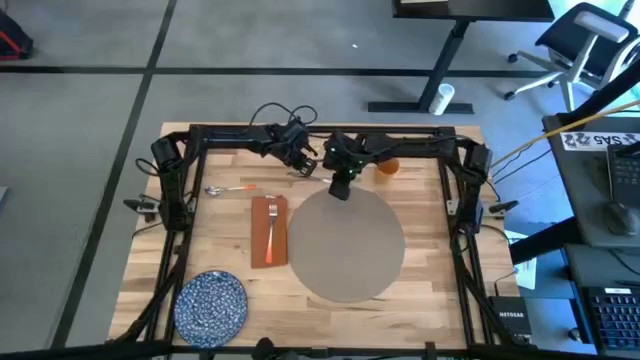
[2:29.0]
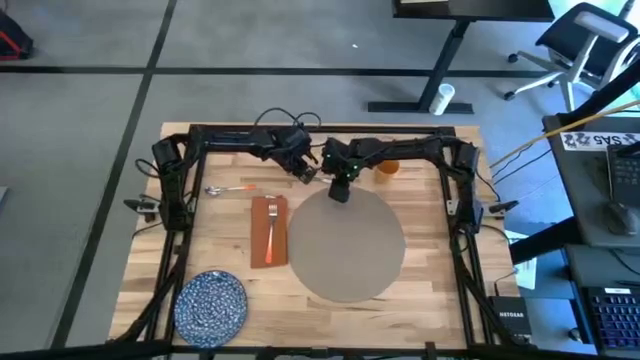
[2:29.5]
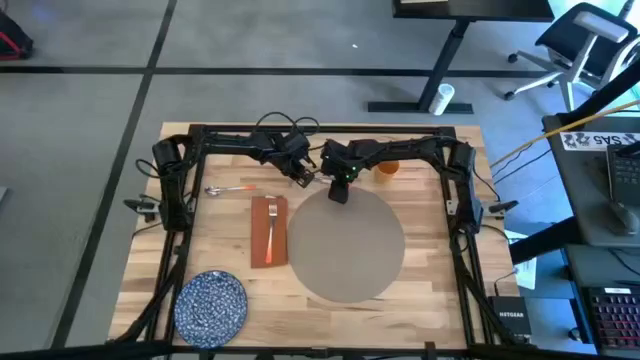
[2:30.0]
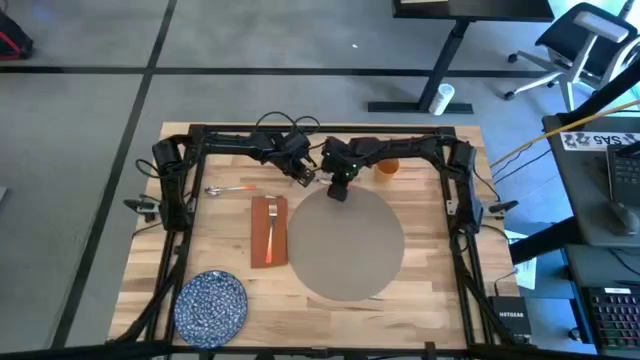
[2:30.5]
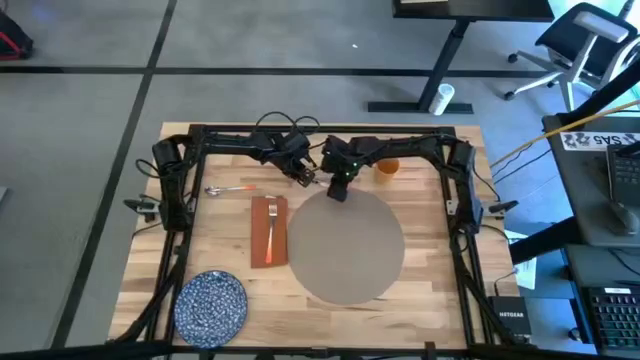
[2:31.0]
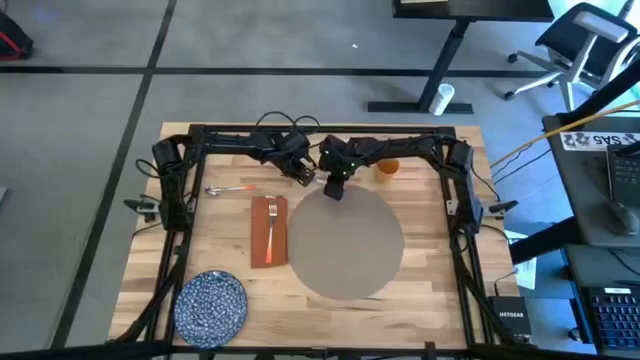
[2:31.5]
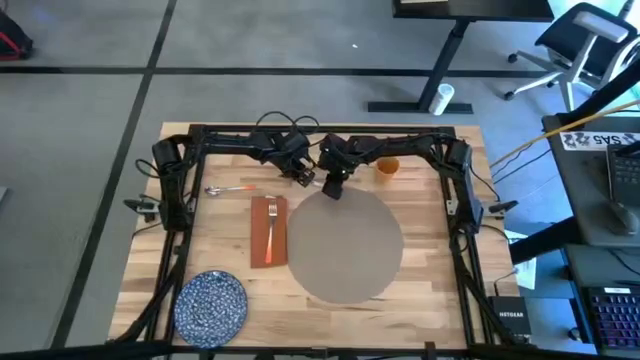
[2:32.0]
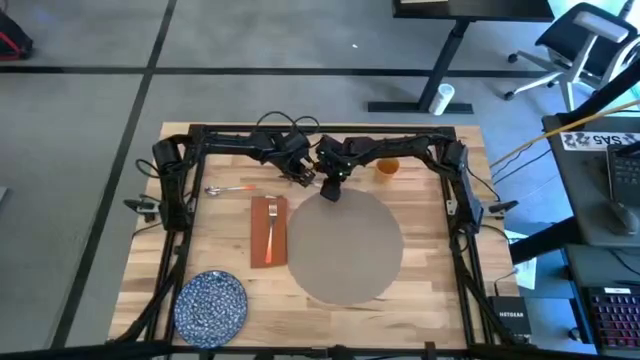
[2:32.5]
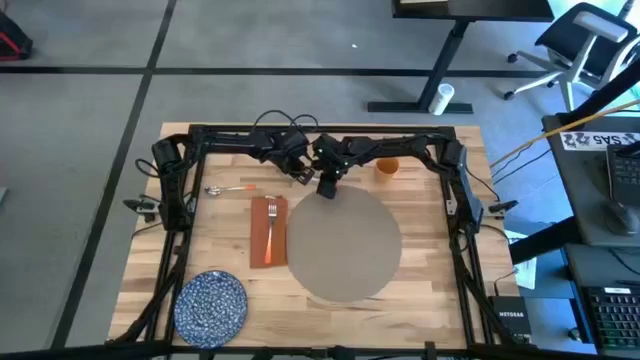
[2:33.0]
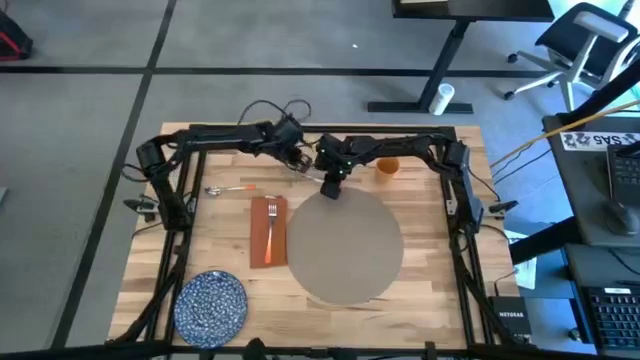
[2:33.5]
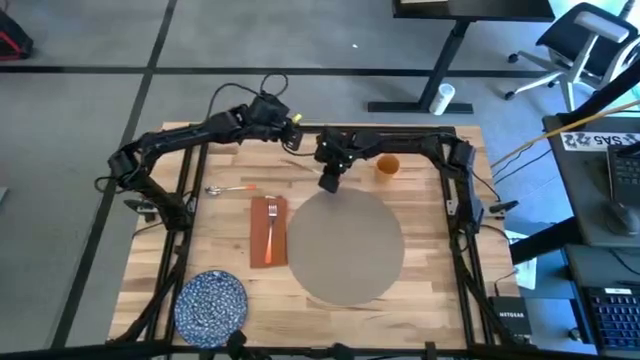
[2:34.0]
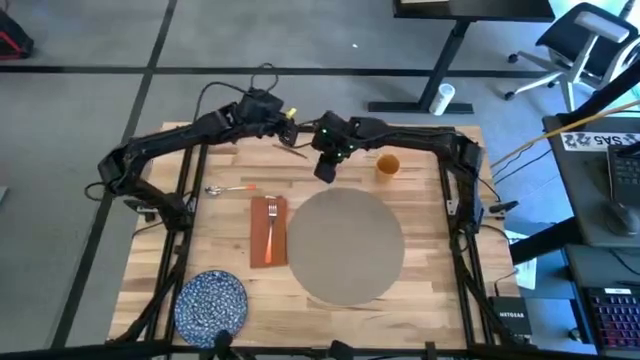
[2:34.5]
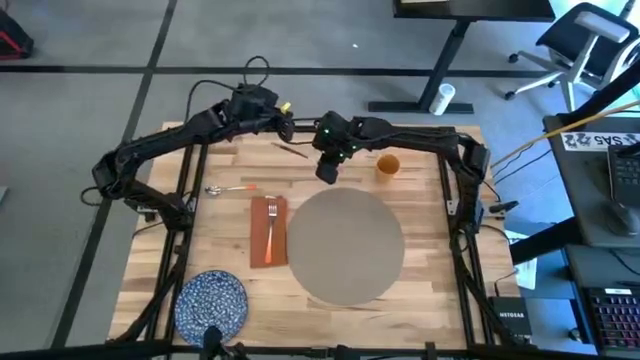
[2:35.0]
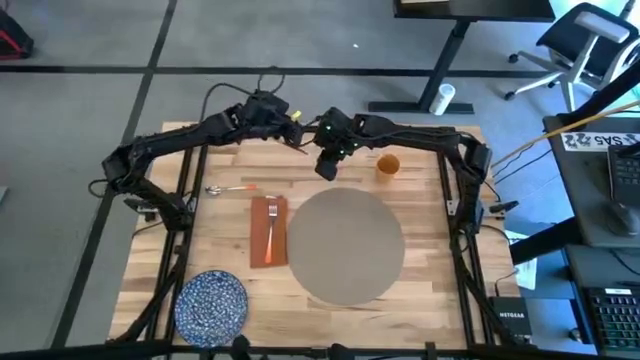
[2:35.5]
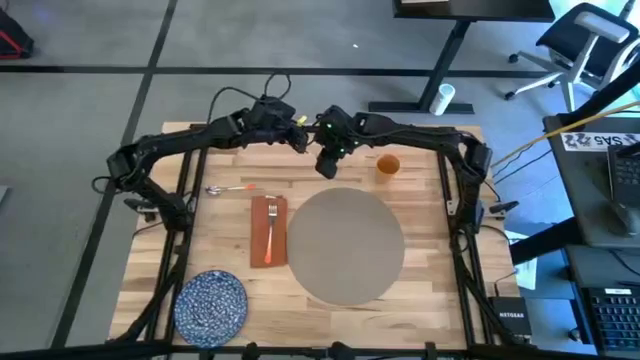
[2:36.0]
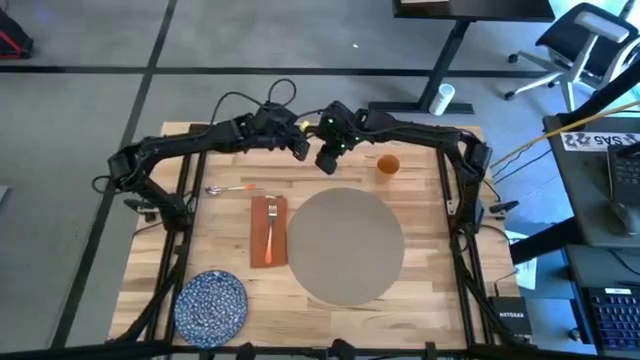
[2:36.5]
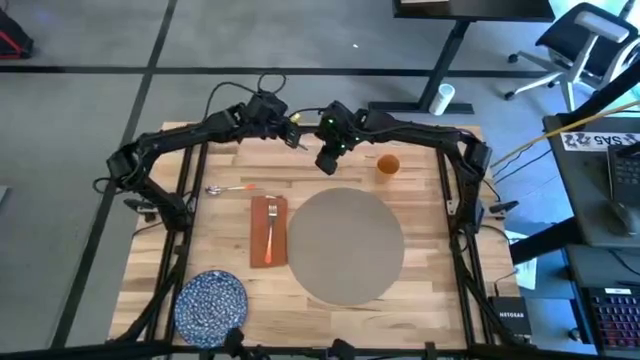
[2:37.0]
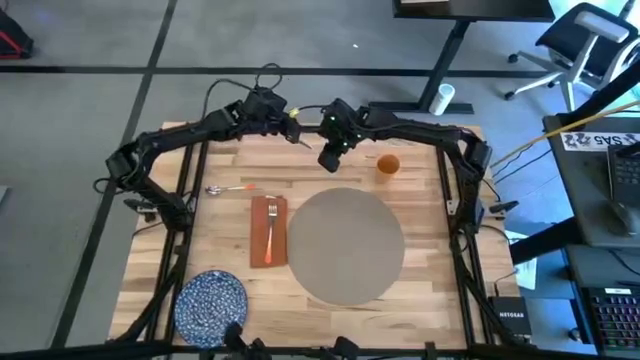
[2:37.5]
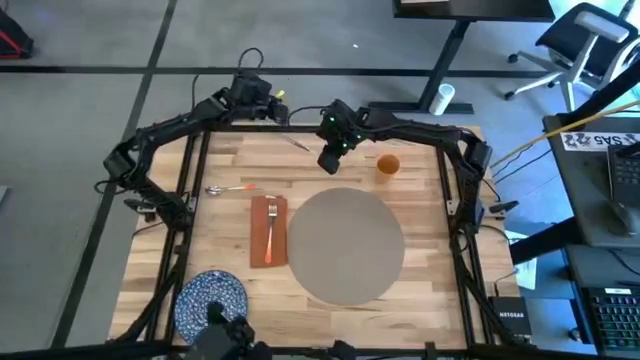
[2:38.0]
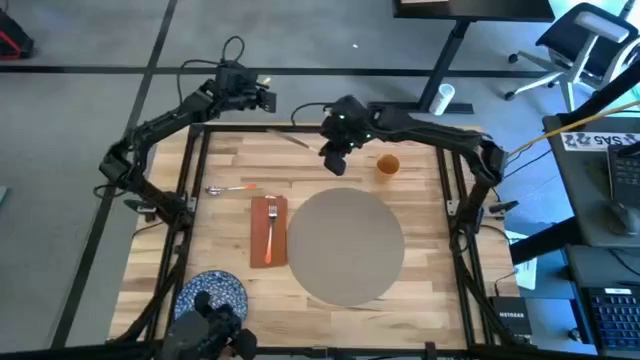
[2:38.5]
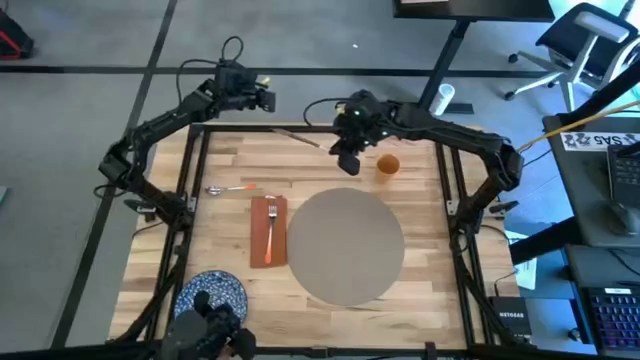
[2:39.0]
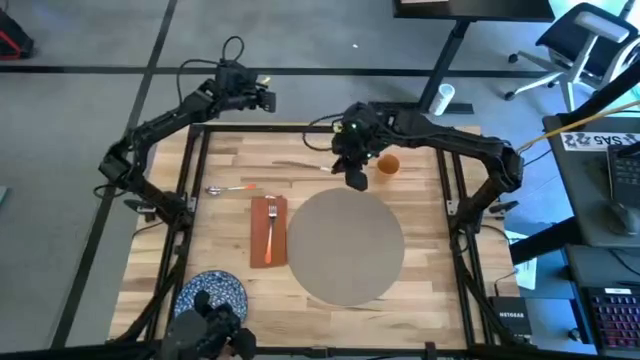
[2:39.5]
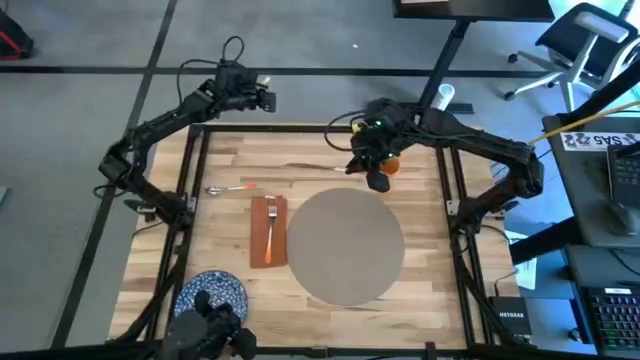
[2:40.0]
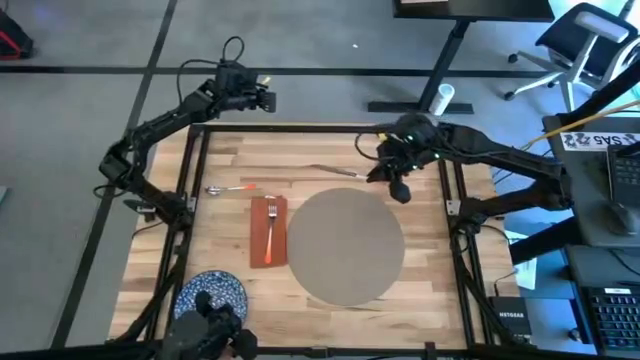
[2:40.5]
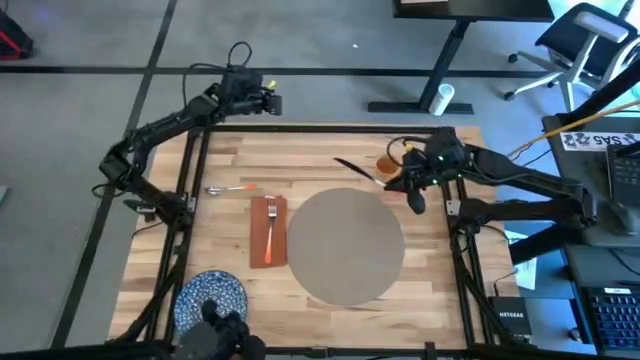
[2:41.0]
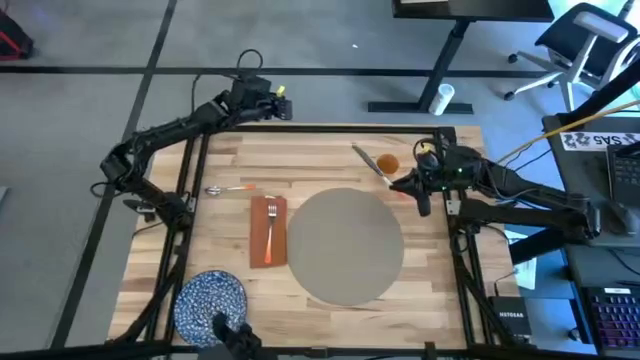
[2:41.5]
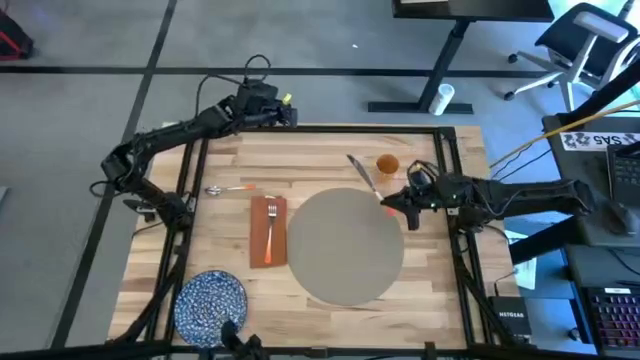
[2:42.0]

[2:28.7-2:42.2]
Task: Set table place
Put the orange knife on the gray mat

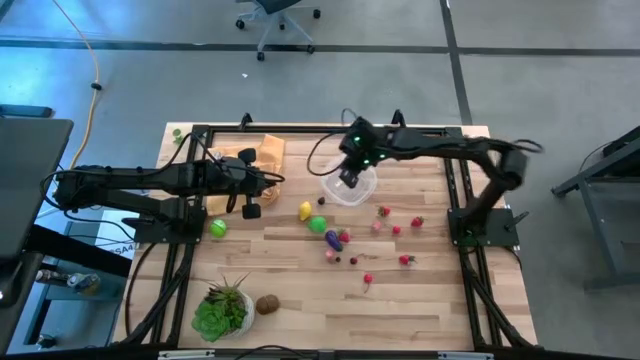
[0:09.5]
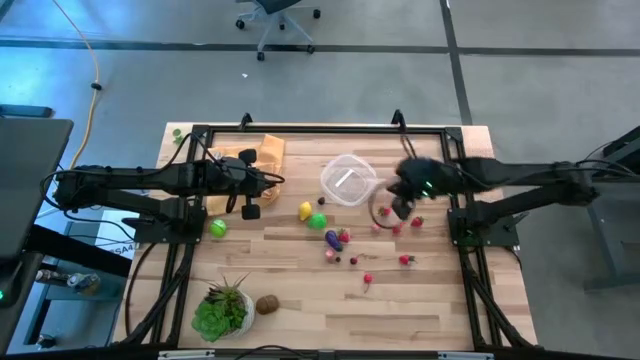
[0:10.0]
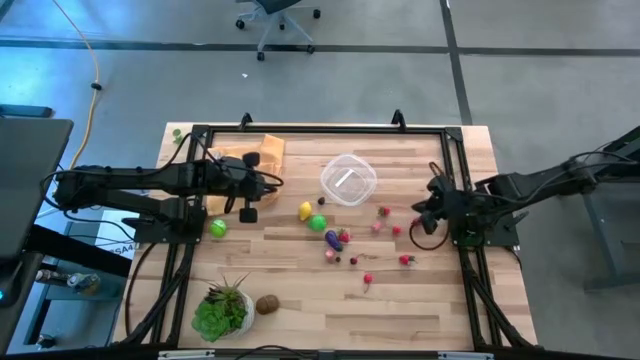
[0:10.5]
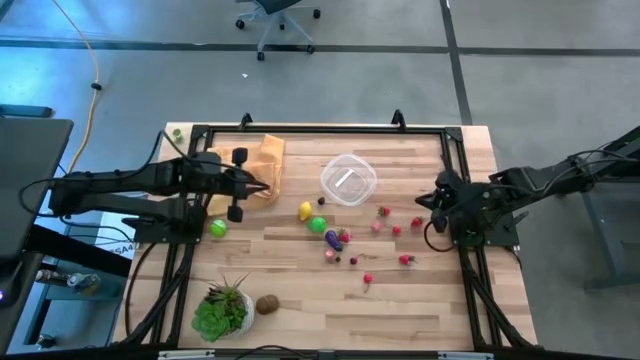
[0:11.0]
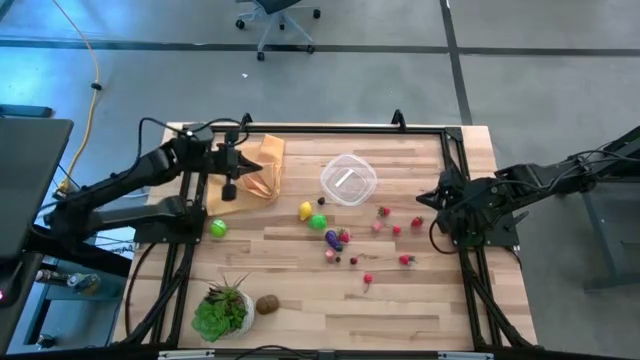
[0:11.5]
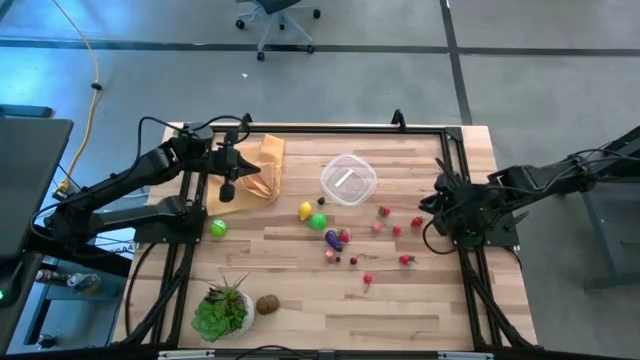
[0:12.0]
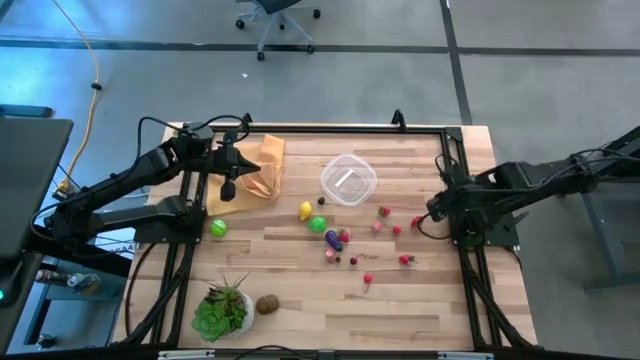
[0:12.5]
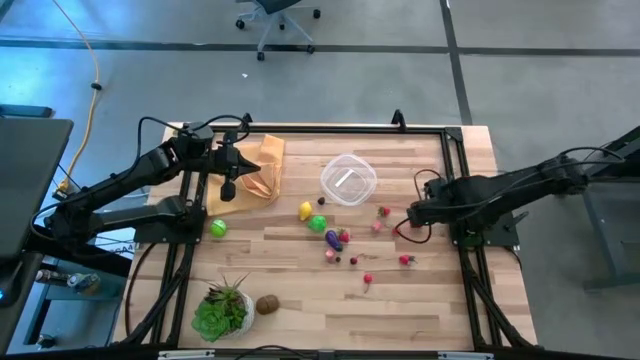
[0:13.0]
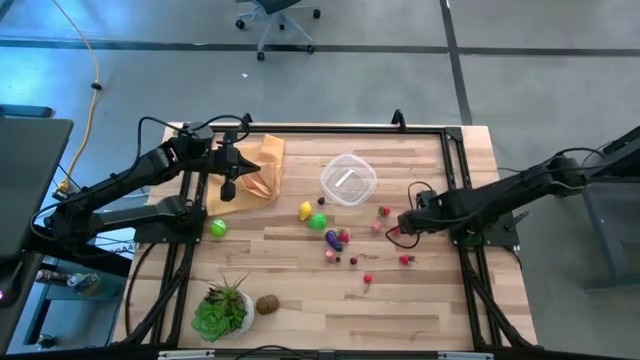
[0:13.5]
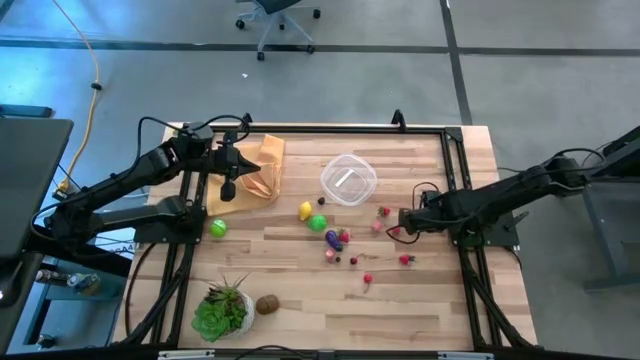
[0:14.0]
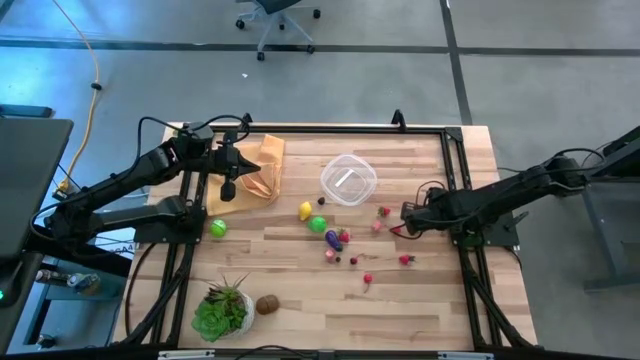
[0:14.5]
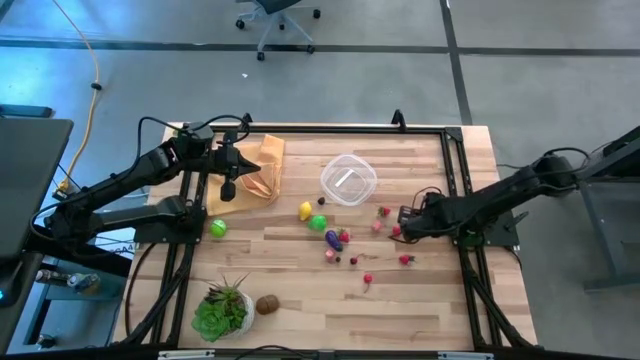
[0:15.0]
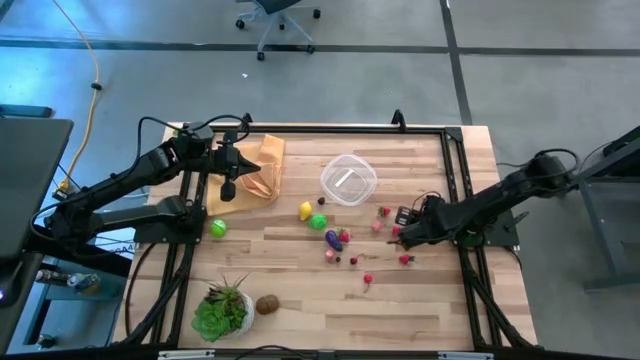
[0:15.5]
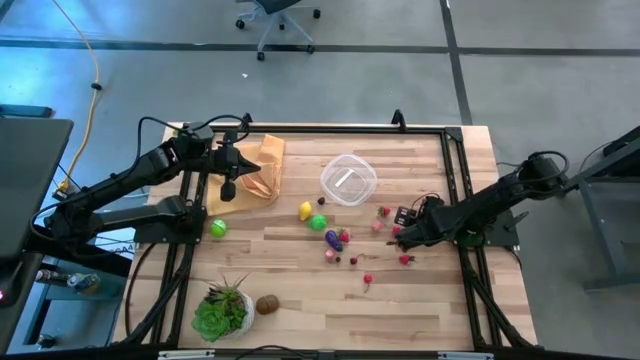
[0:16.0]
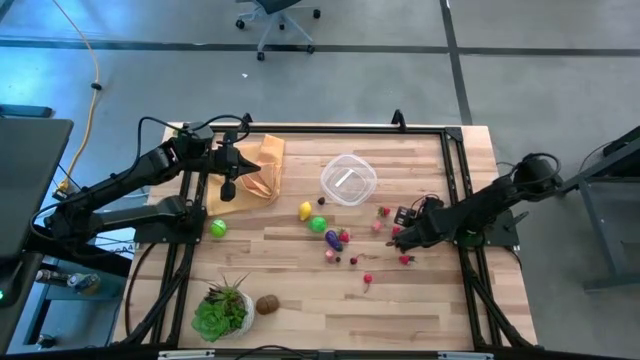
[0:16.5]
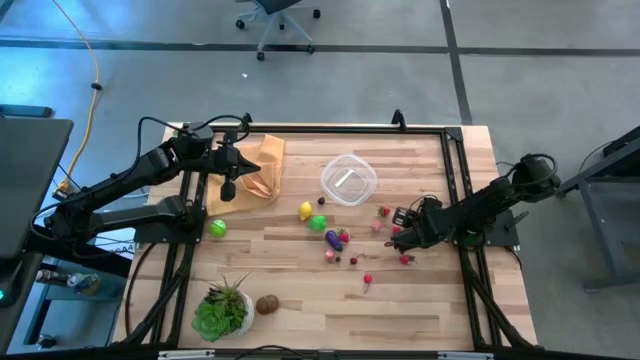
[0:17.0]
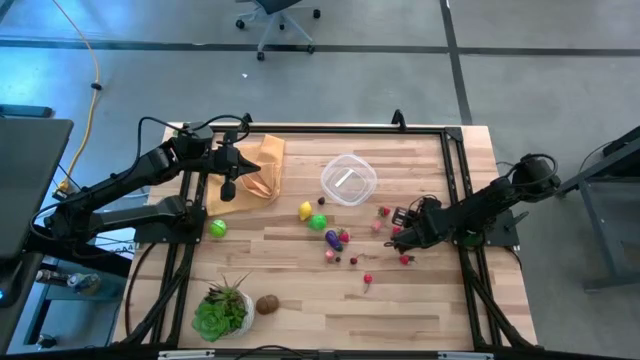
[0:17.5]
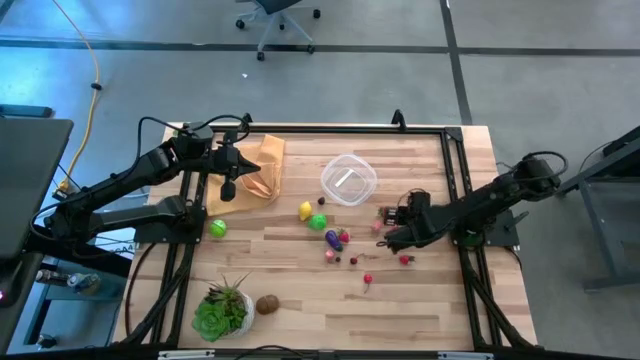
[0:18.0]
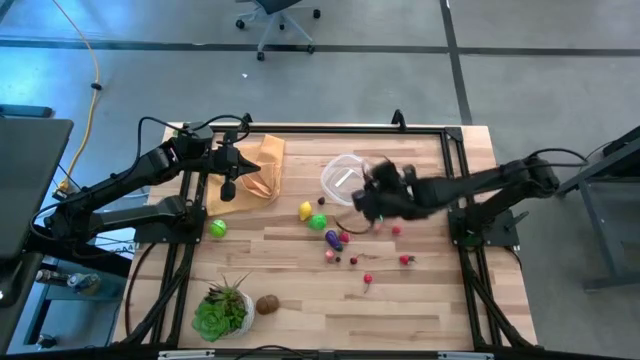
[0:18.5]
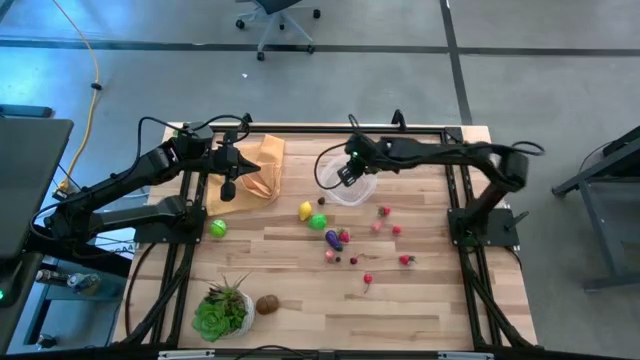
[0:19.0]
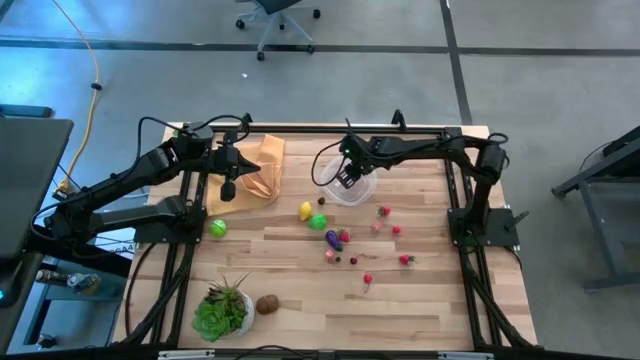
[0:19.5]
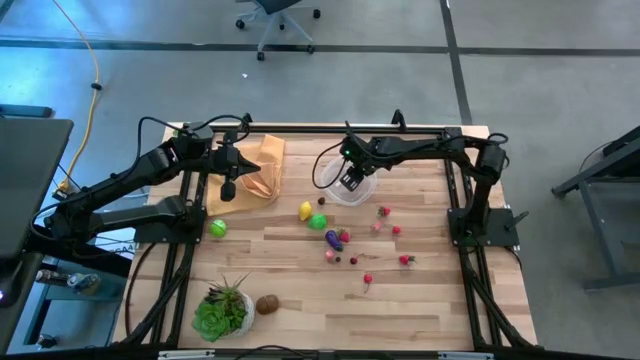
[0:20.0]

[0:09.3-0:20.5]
Task: Pick and placing Produce into tupperware
Put the red strawberry into the transparent container
